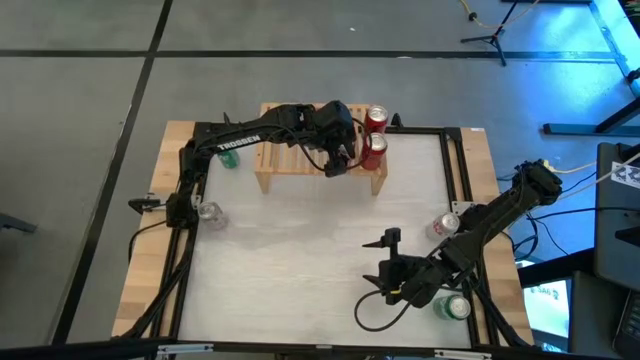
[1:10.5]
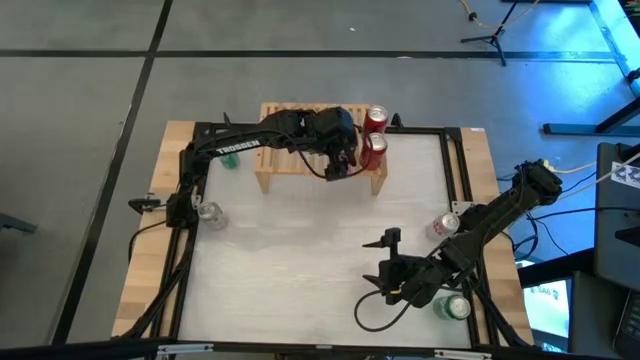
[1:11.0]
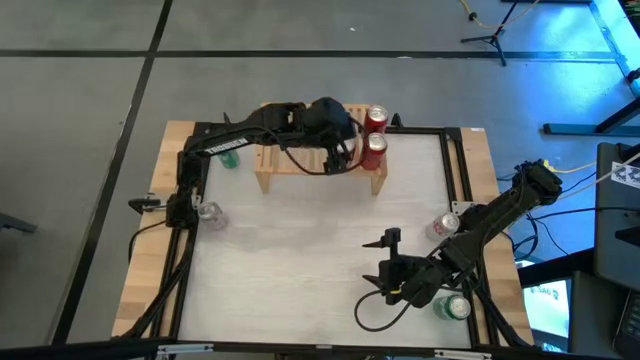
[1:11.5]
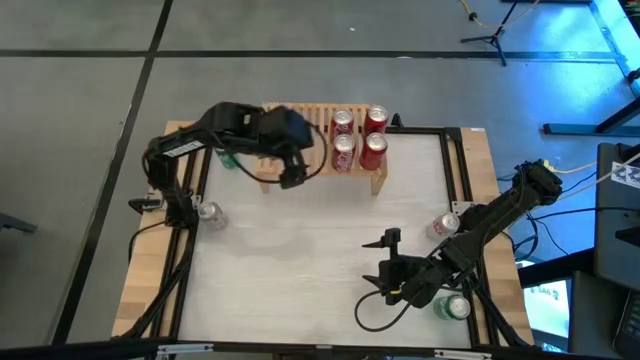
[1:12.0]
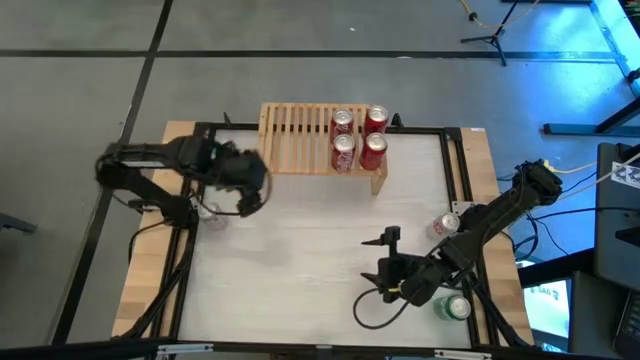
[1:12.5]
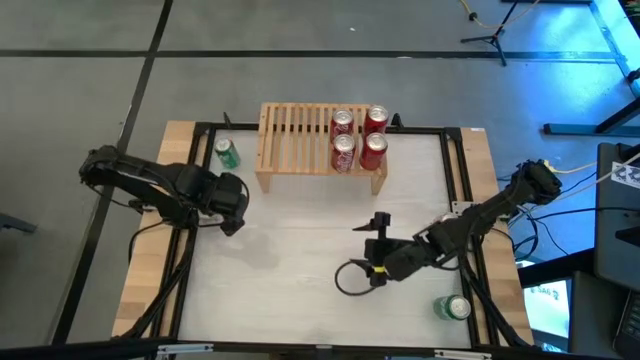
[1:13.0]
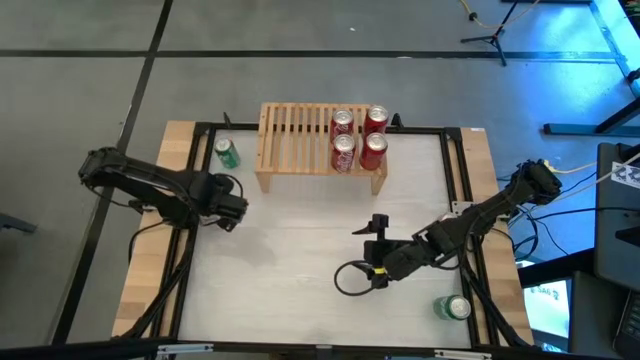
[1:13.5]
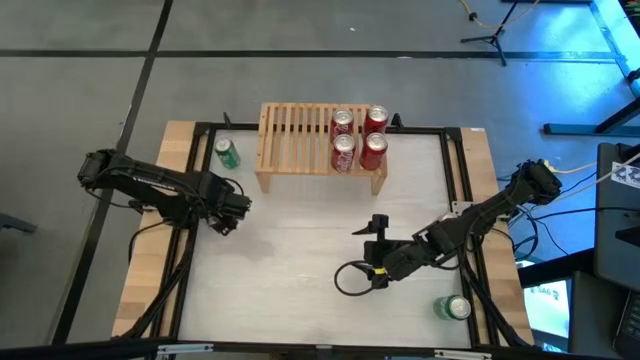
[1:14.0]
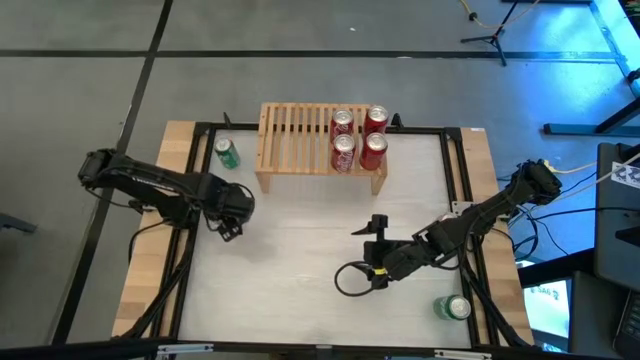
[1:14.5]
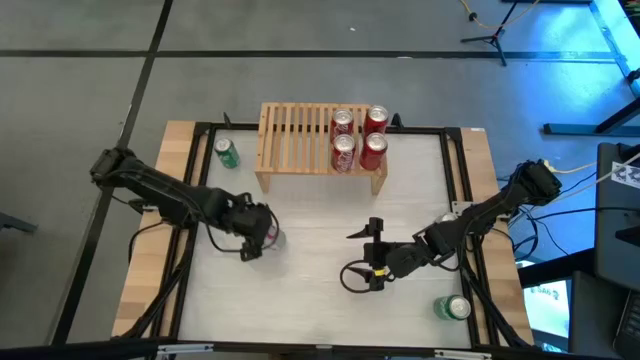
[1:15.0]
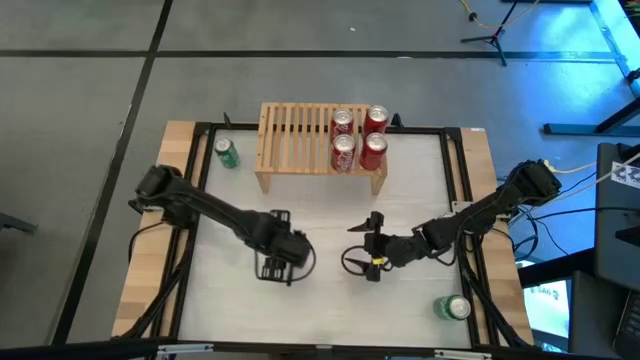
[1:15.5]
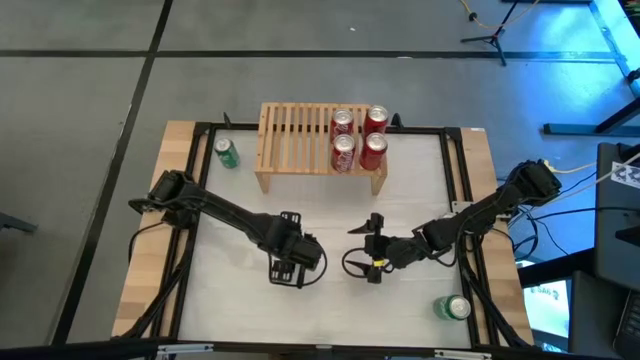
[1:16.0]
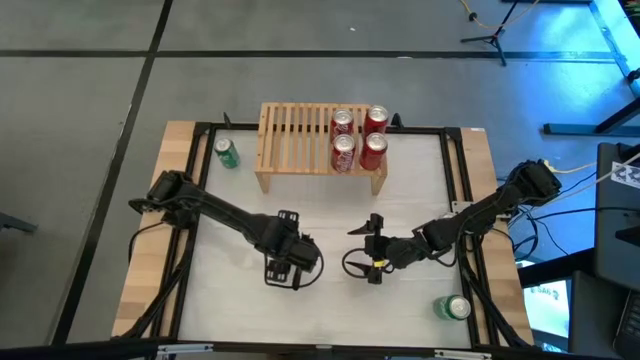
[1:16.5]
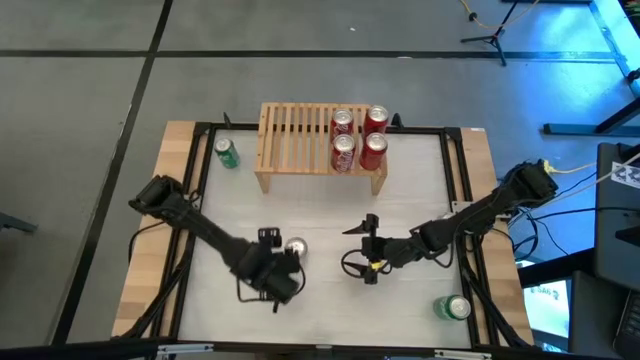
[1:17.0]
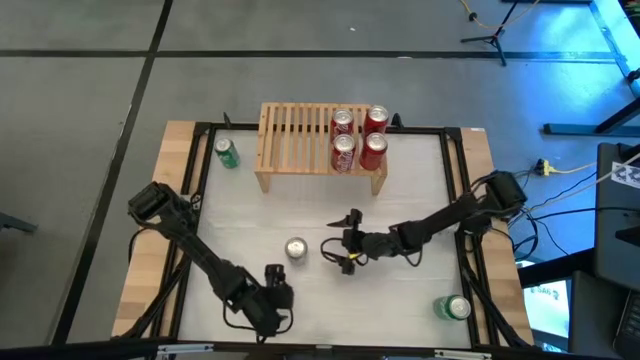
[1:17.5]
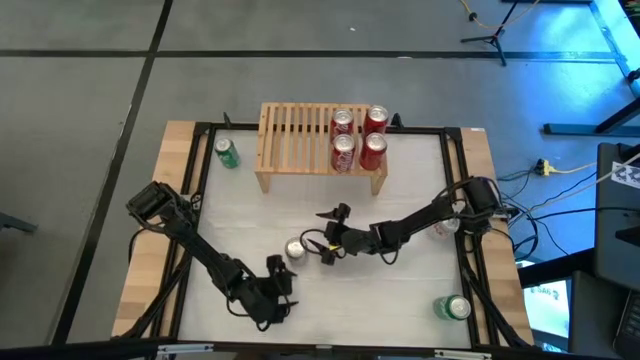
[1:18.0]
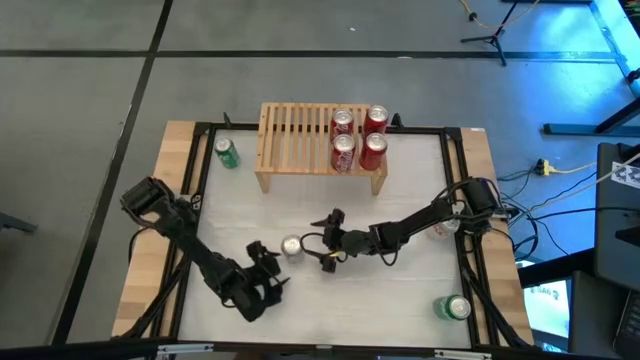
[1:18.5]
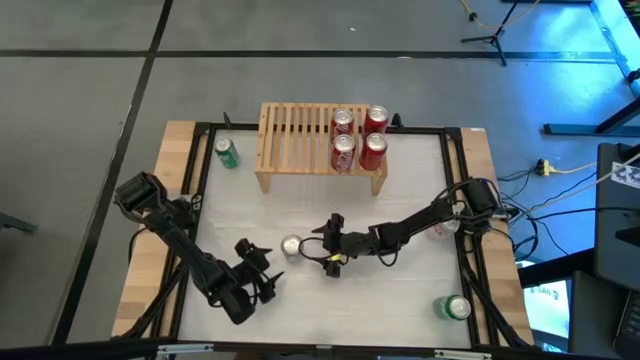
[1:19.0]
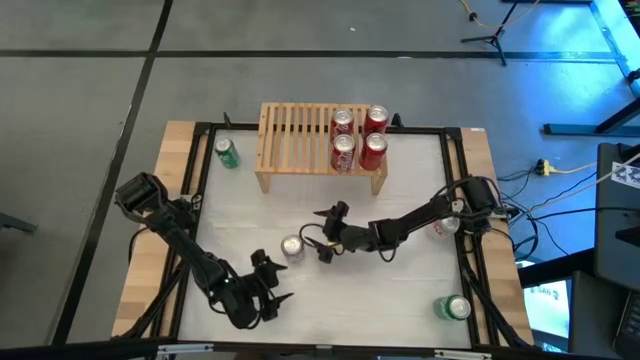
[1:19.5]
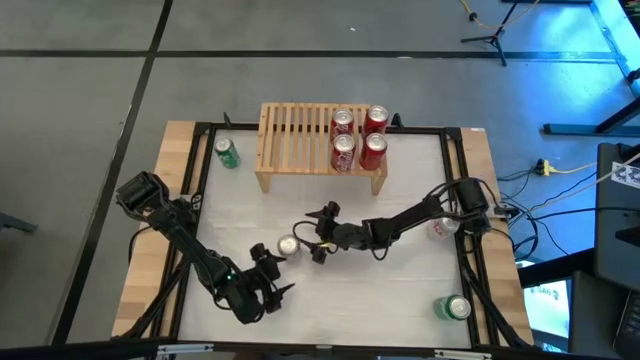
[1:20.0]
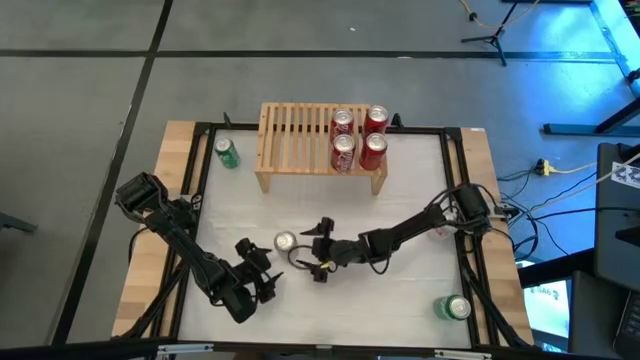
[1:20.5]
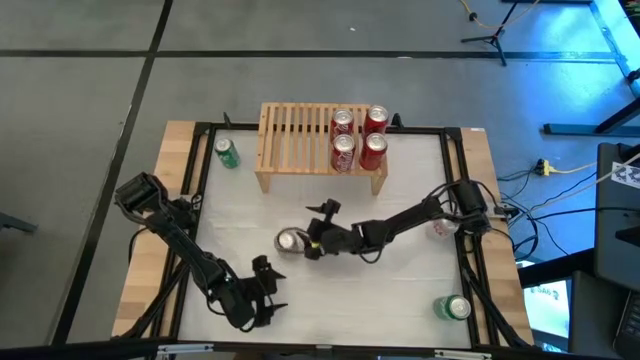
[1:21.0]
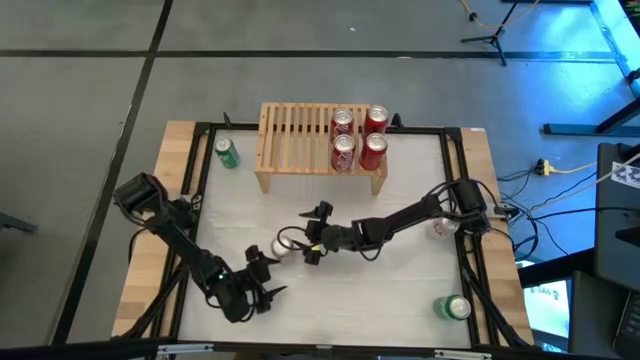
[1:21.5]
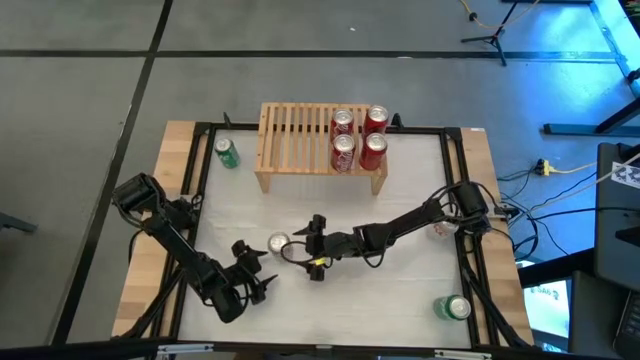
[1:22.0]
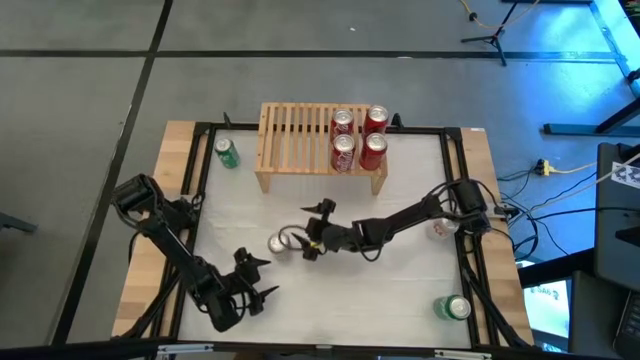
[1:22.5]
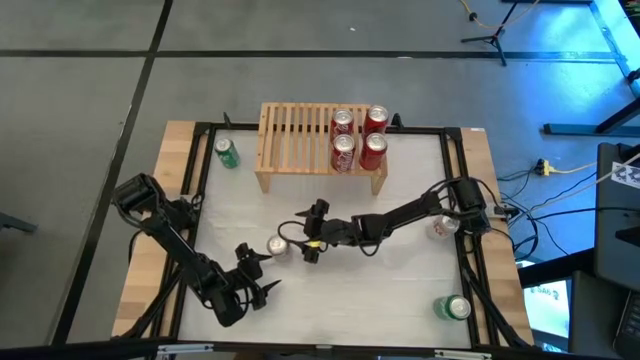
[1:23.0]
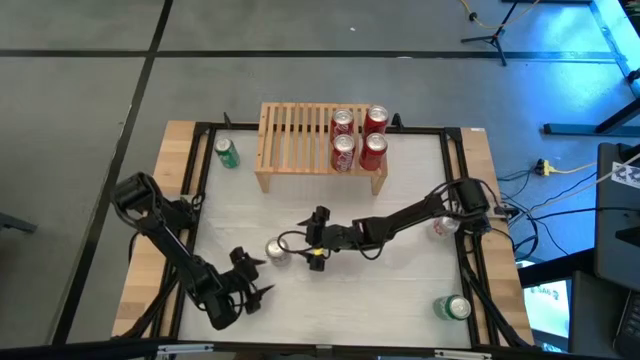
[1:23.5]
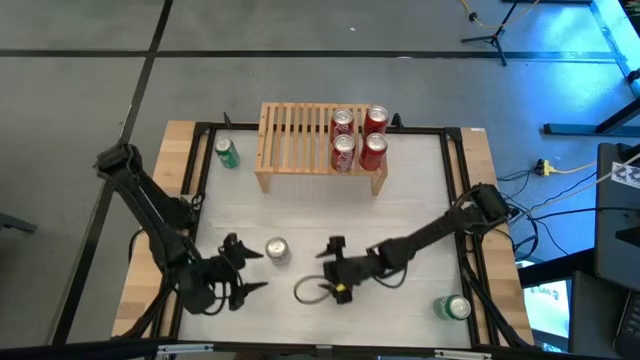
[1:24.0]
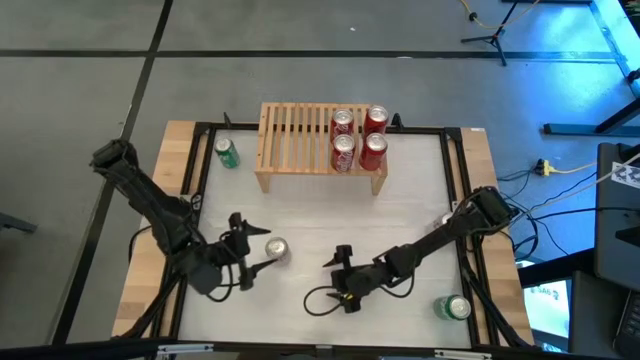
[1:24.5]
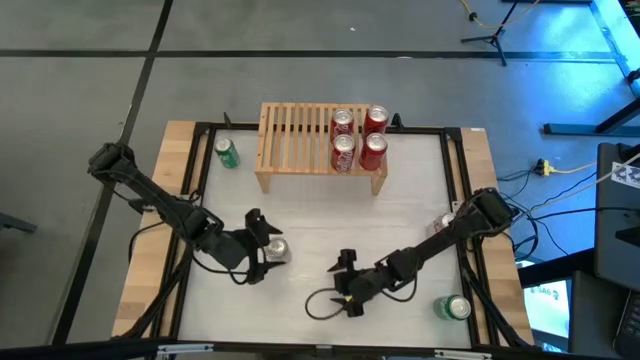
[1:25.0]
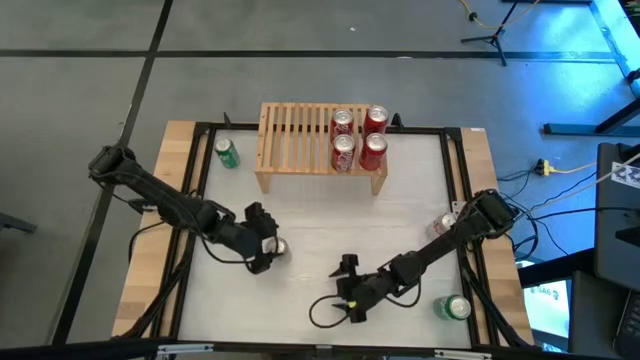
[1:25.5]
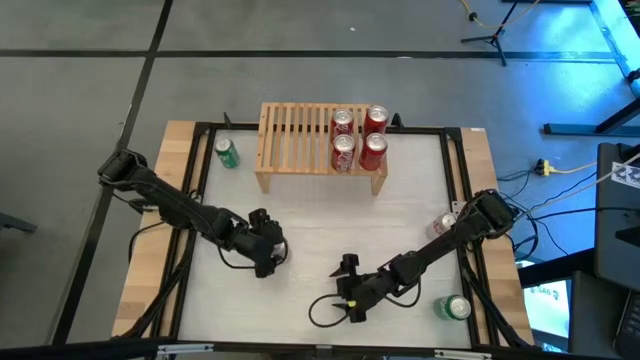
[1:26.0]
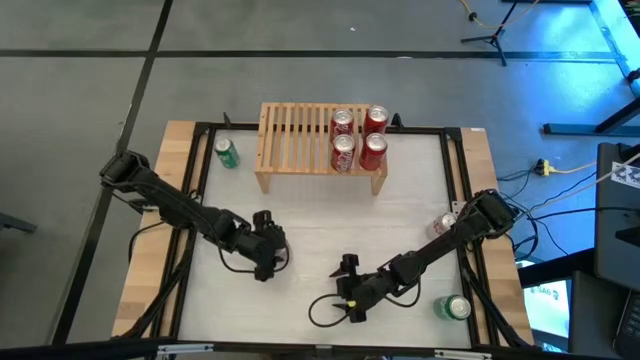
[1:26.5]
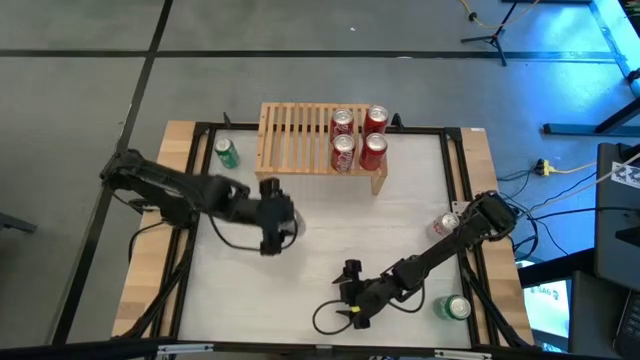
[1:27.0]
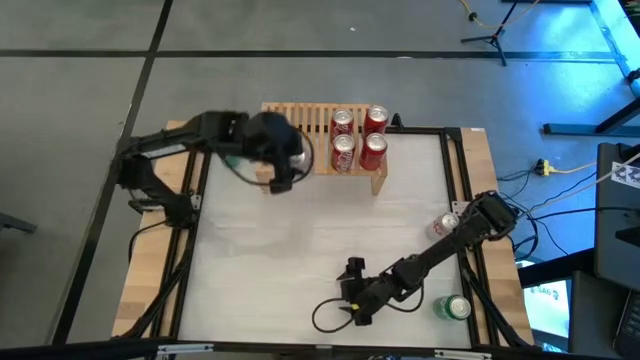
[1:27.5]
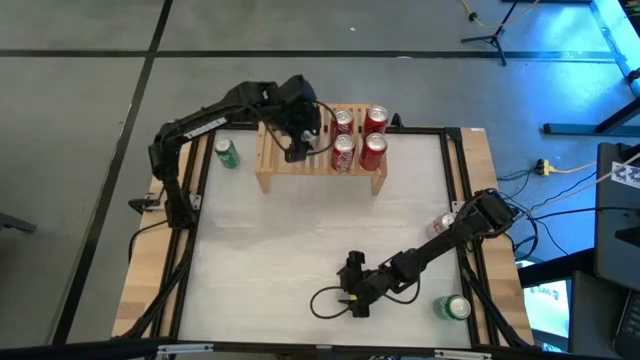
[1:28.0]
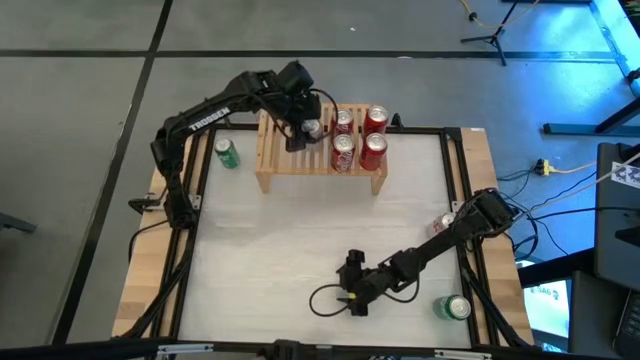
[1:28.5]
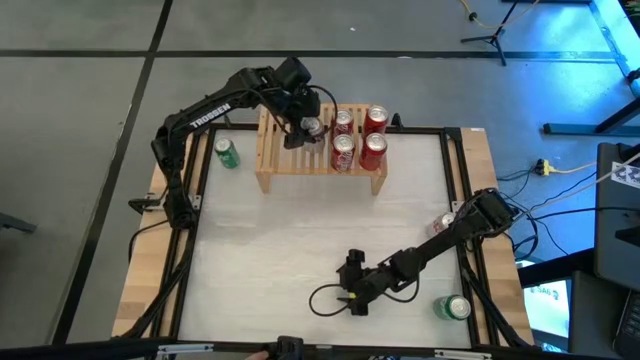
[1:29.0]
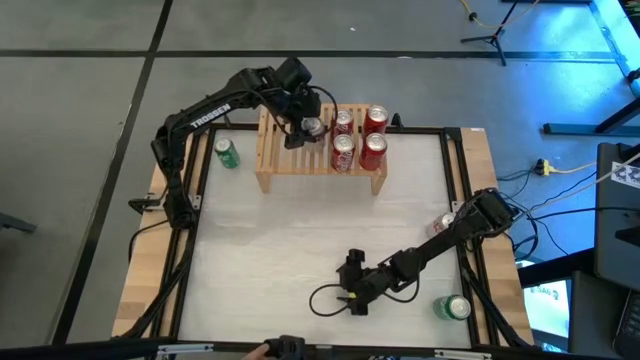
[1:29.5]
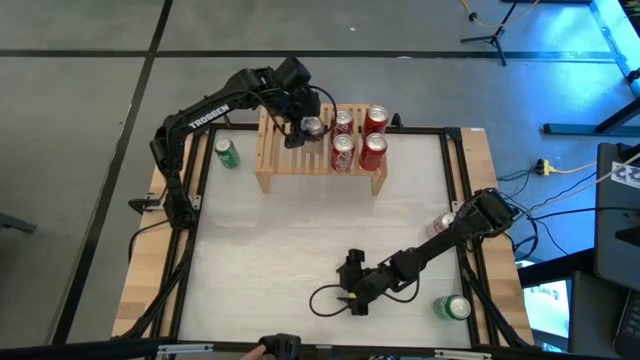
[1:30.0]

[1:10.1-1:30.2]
Task: Place canned beverage on shelf
Put the left white soda can on the shelf

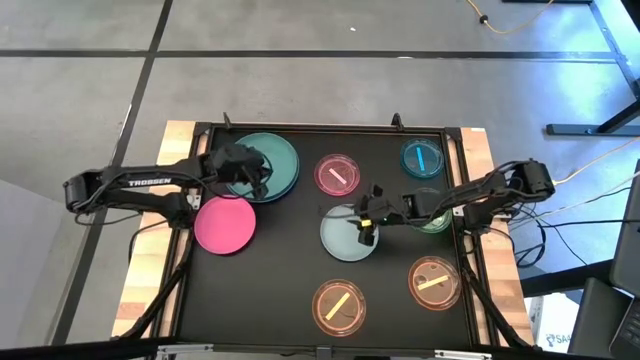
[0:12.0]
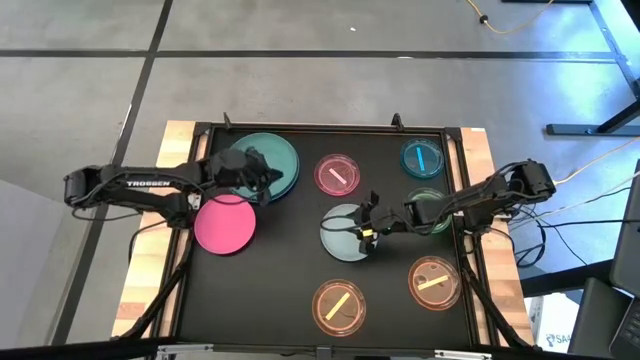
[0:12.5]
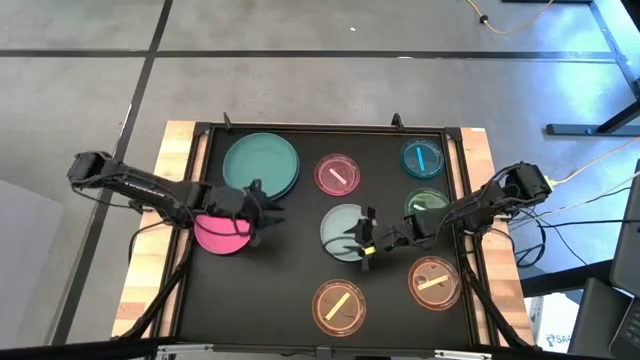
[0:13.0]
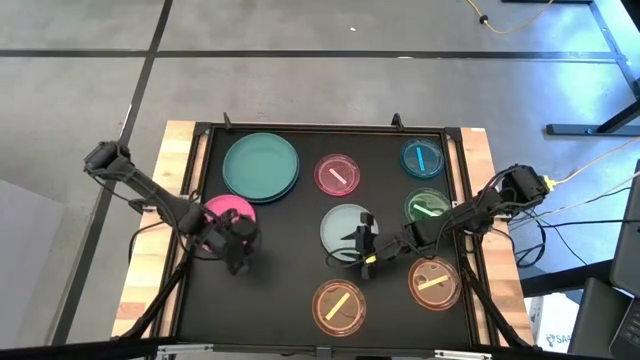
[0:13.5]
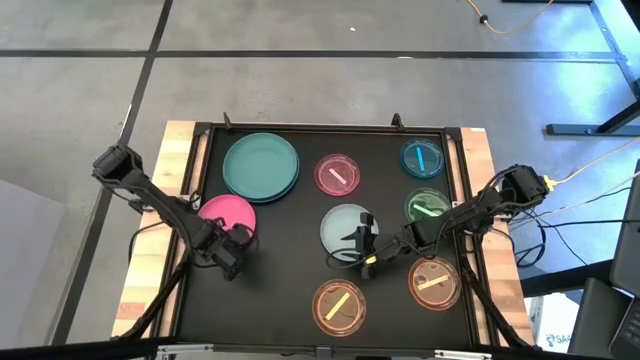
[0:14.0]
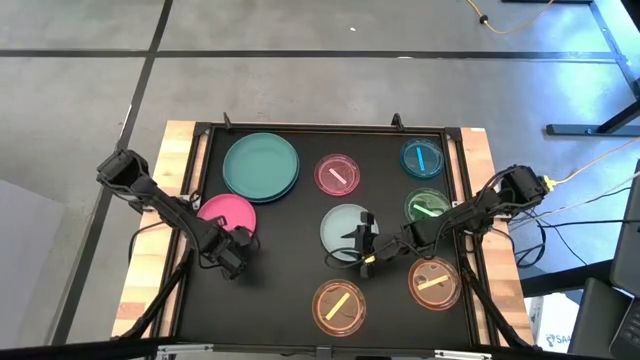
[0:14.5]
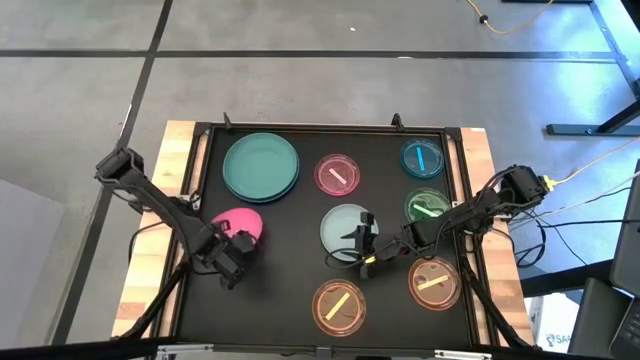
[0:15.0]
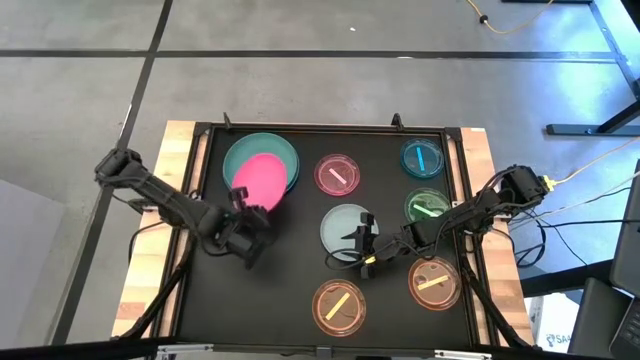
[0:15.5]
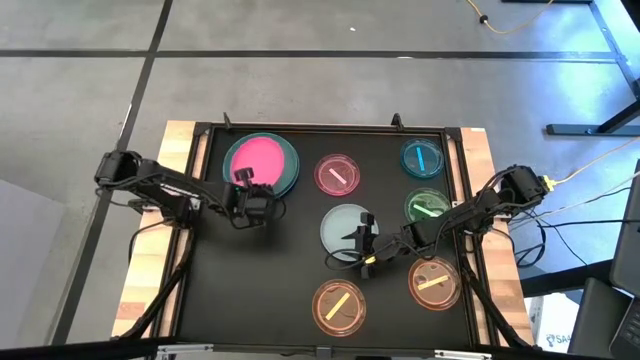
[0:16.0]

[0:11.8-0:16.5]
Task: Stack plastic plates
Stack the pink plate on top of the green plate
